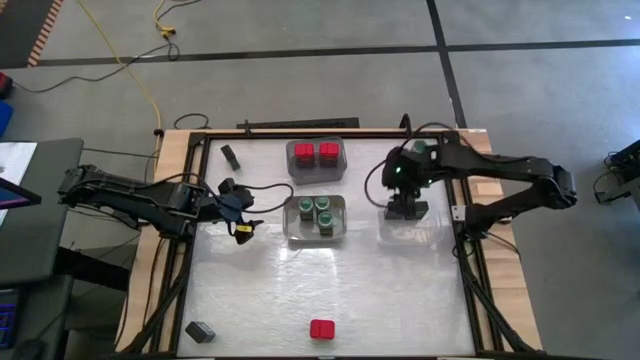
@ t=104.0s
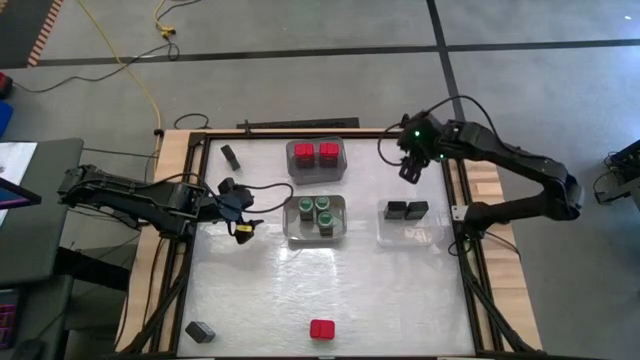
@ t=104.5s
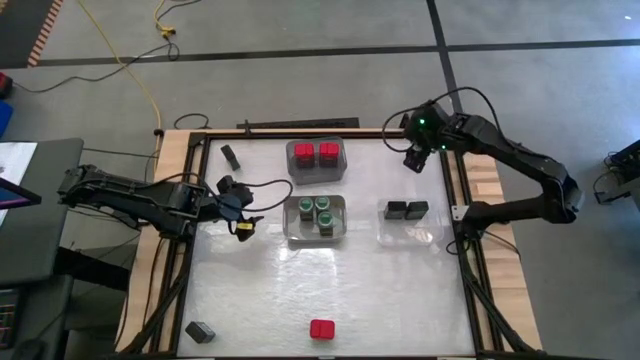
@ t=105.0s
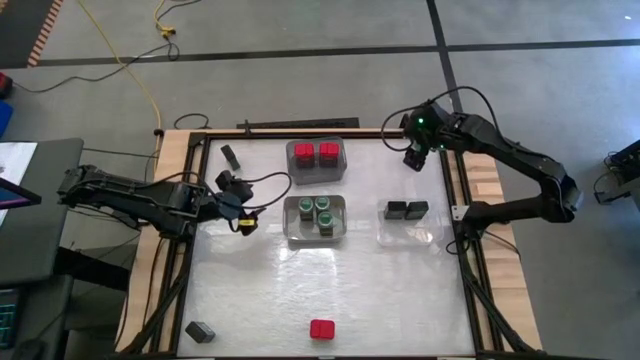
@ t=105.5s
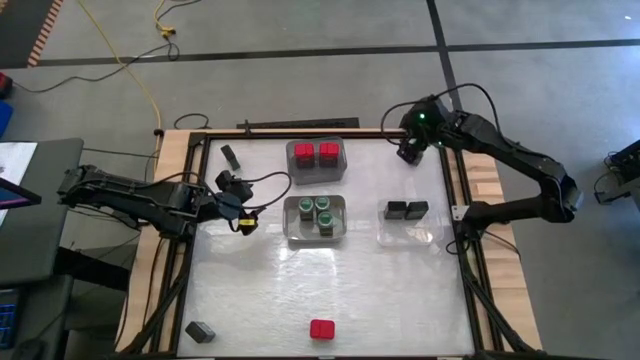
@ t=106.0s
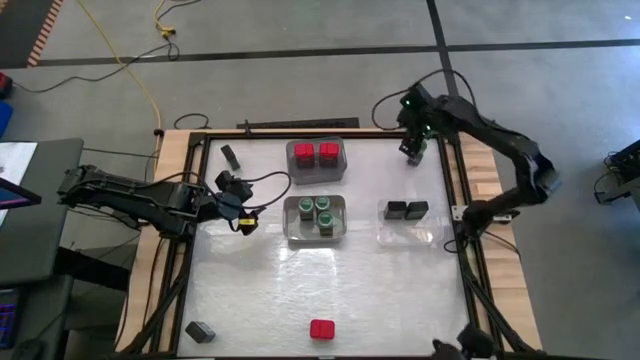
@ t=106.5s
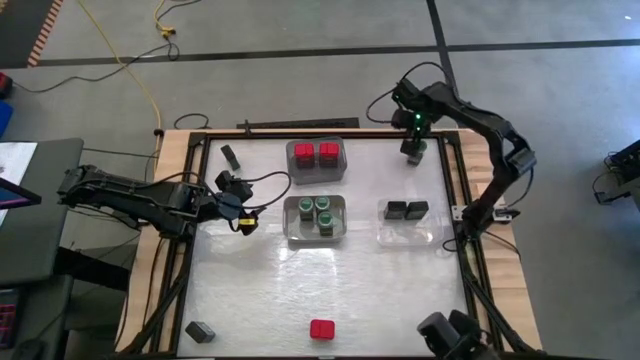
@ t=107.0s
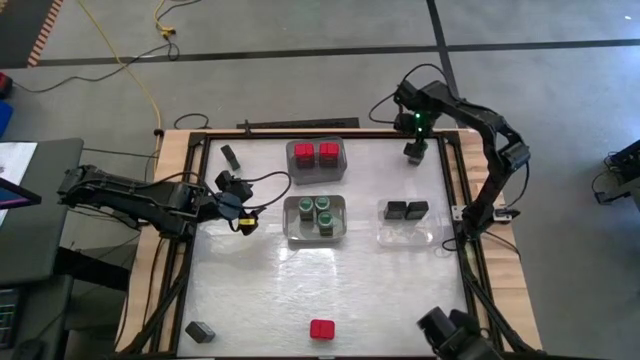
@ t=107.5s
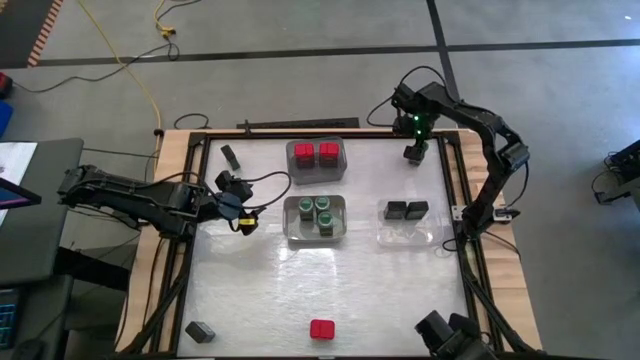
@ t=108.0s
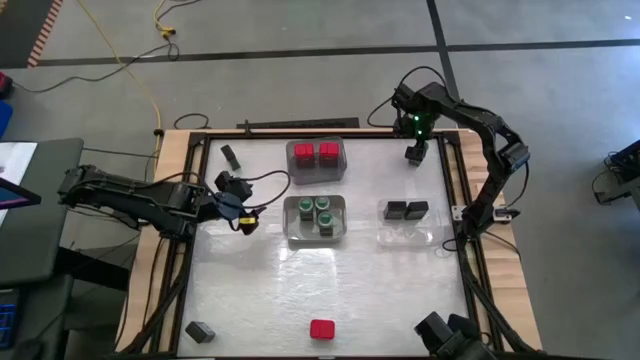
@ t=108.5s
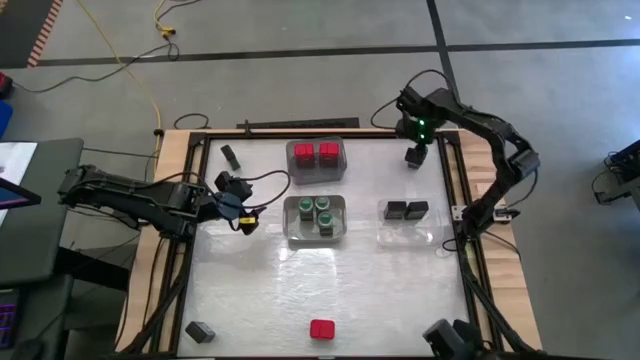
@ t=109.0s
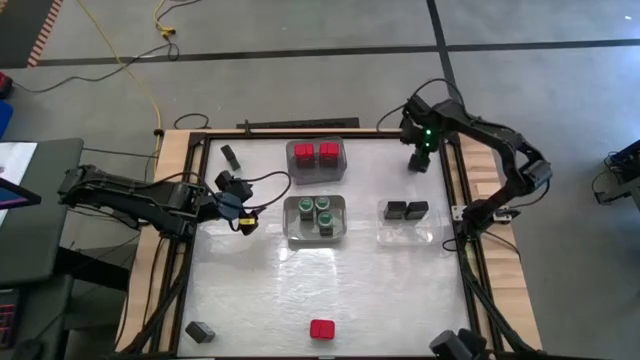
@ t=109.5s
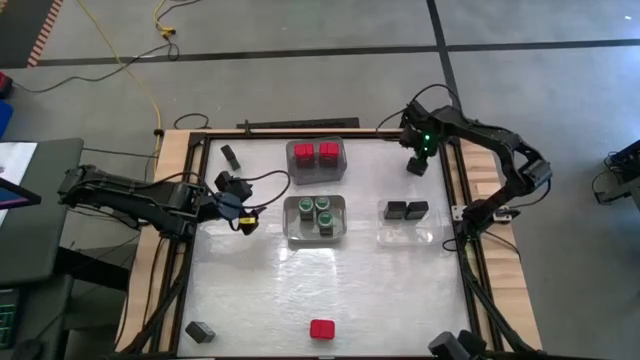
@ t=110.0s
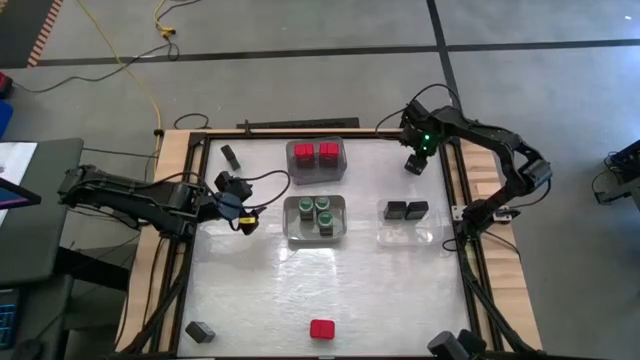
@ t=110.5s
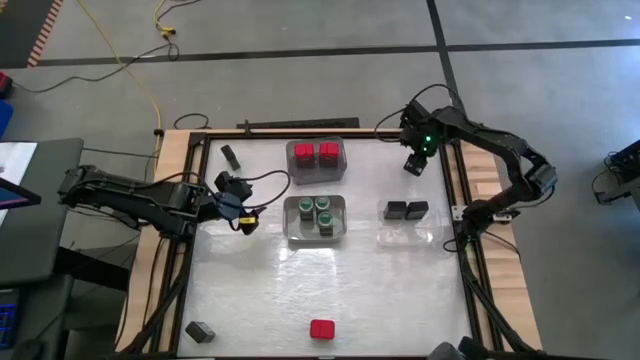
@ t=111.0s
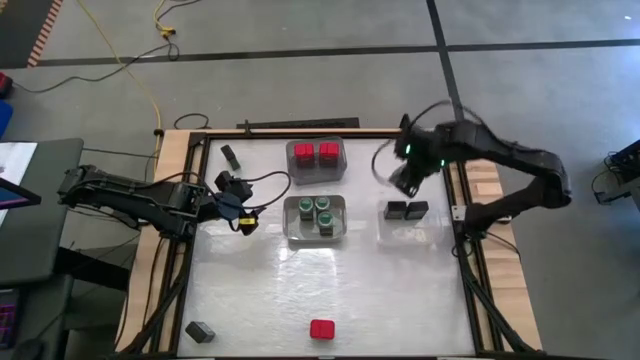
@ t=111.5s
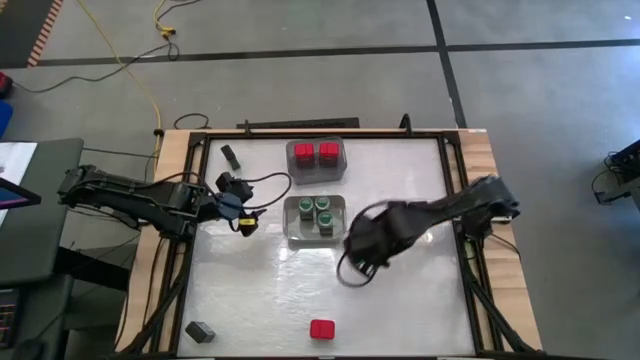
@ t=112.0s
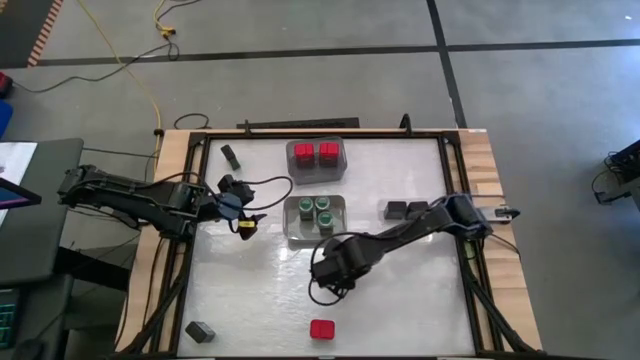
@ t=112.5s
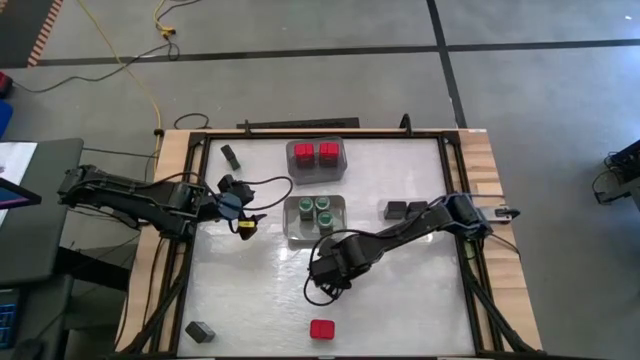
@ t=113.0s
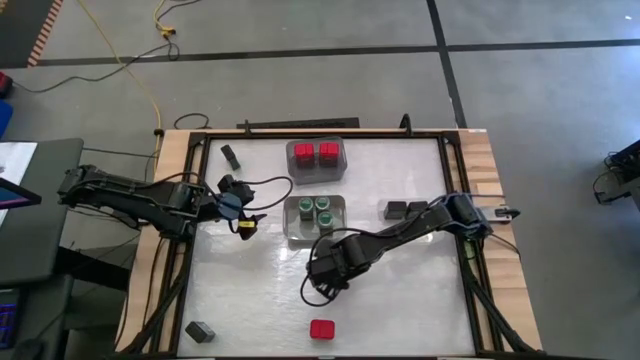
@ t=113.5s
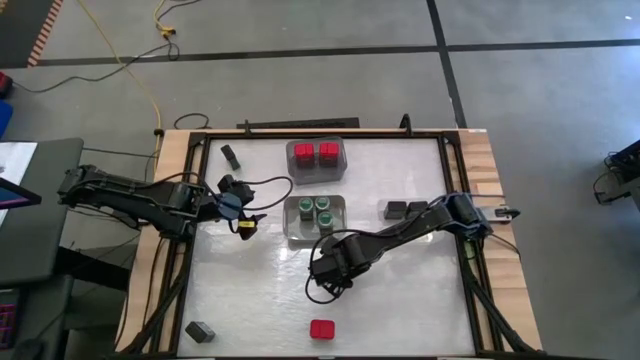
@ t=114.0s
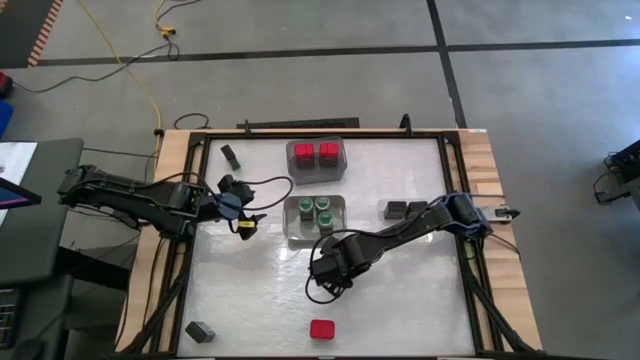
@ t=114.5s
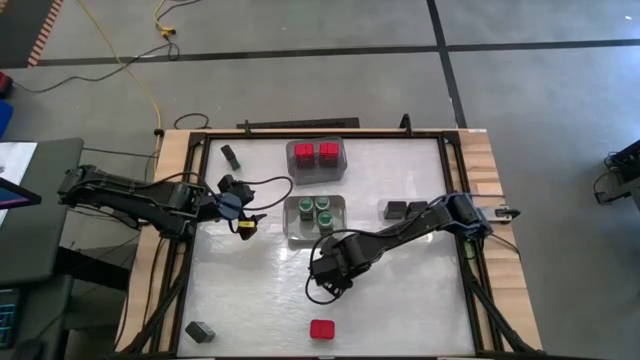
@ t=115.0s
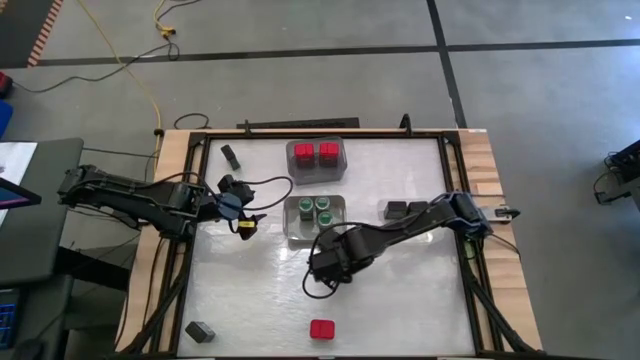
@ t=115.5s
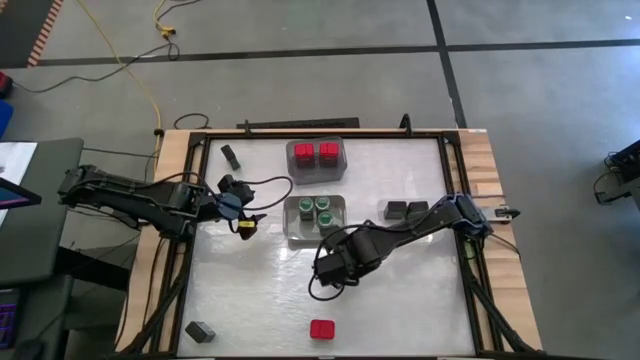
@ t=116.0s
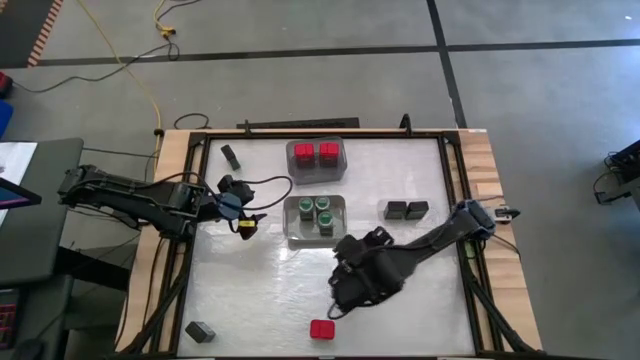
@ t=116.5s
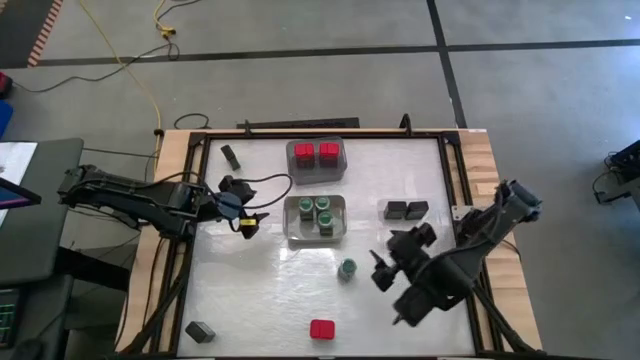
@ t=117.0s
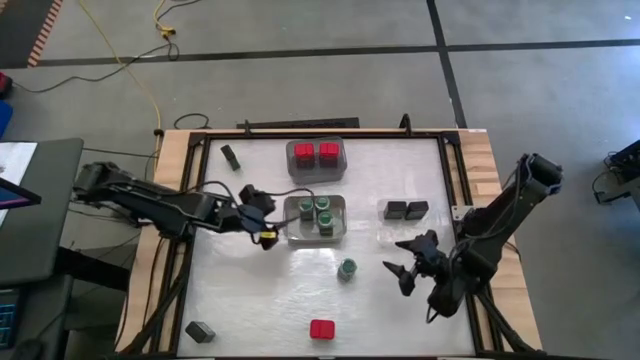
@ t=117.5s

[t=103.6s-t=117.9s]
Task: Sort spices by type
Put the green spice bottle into the gray bin

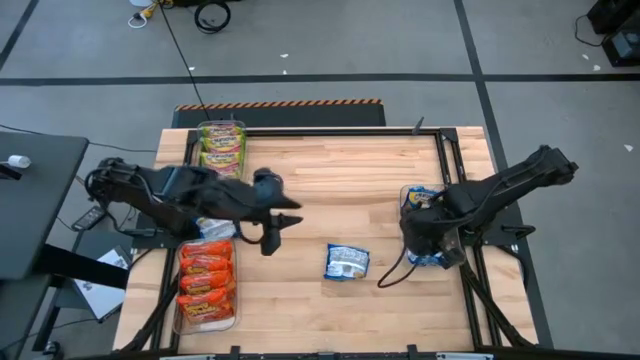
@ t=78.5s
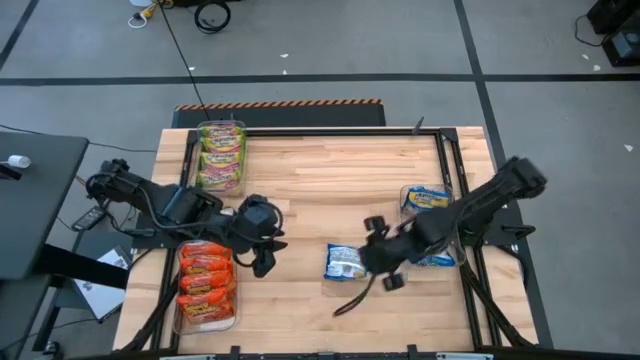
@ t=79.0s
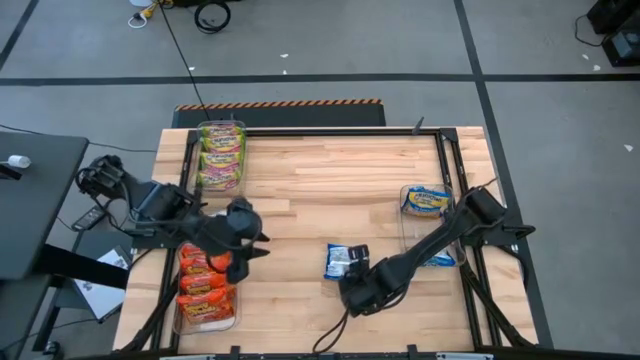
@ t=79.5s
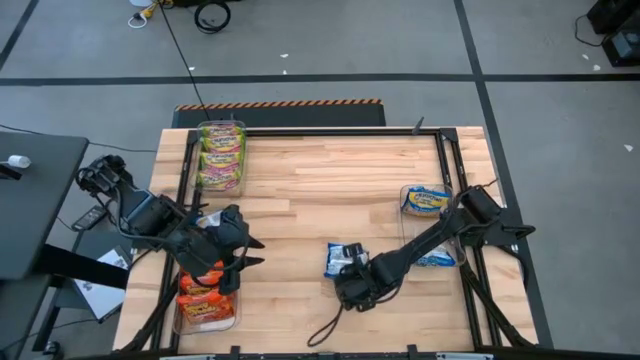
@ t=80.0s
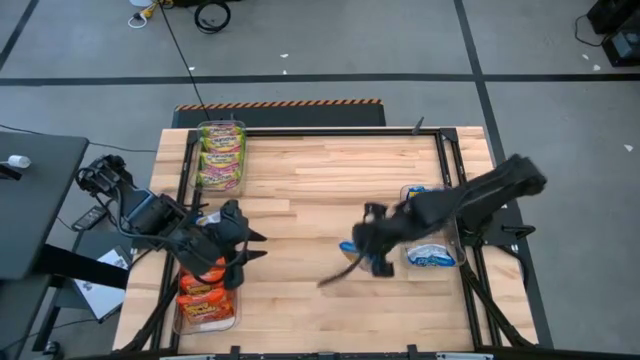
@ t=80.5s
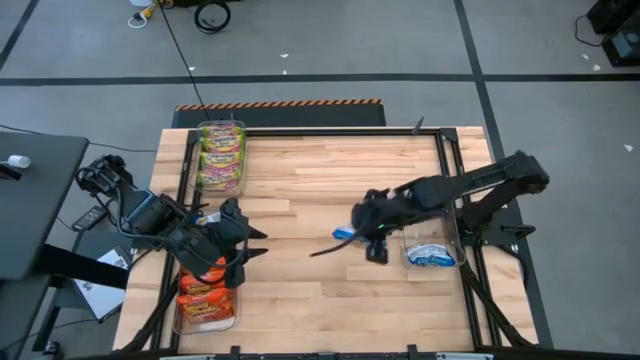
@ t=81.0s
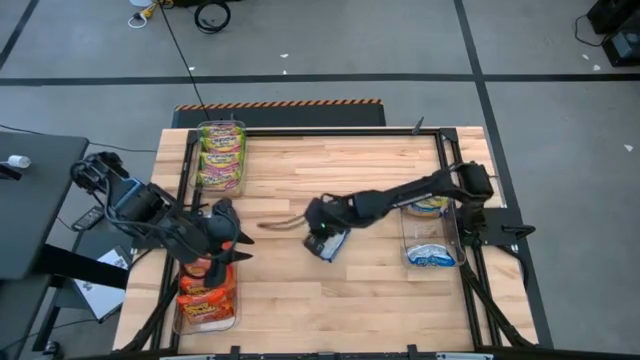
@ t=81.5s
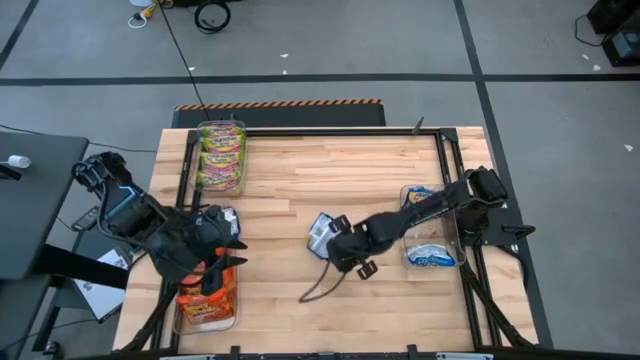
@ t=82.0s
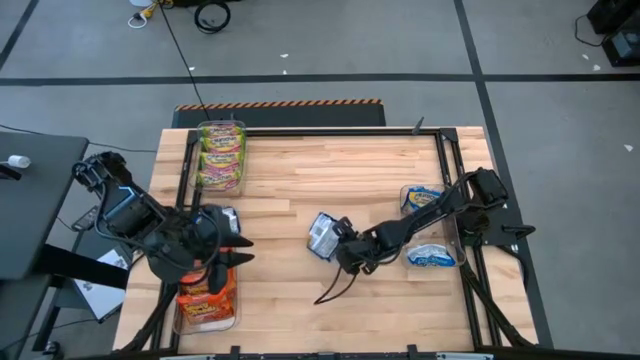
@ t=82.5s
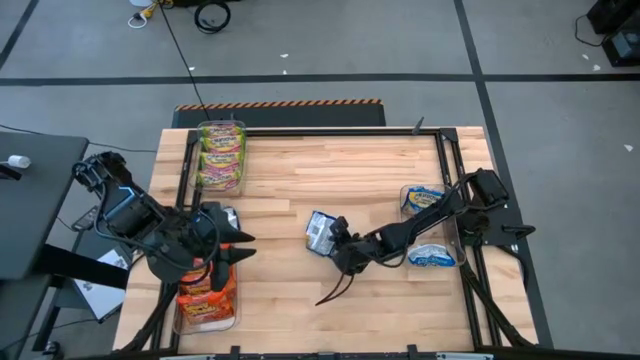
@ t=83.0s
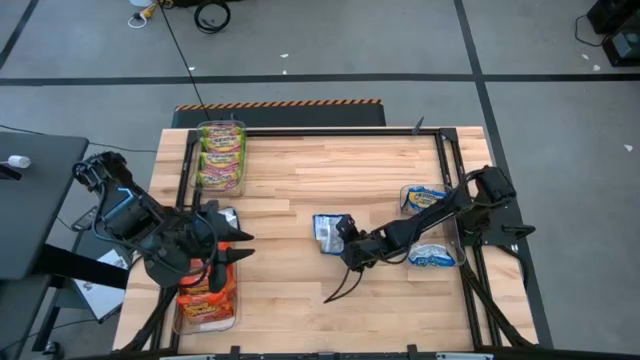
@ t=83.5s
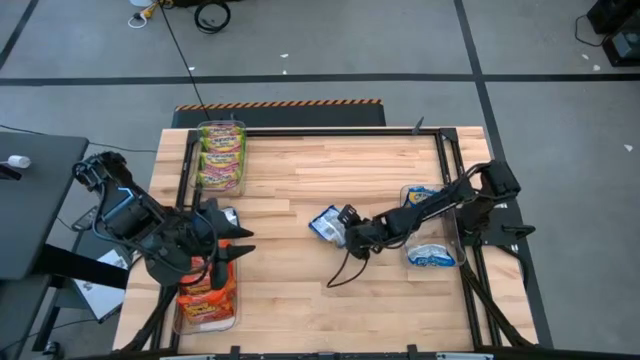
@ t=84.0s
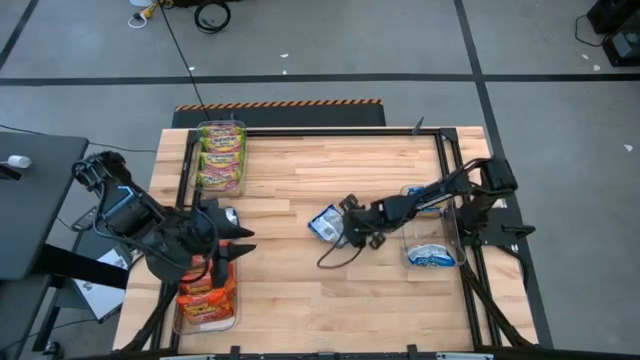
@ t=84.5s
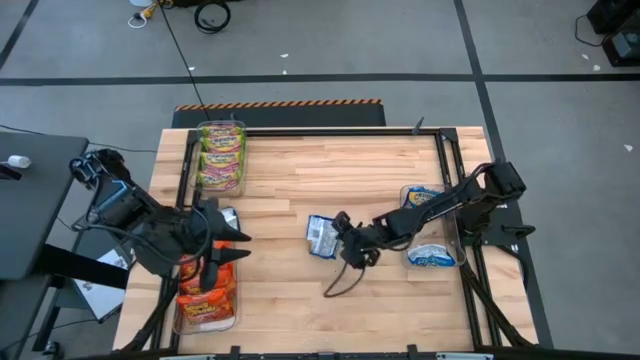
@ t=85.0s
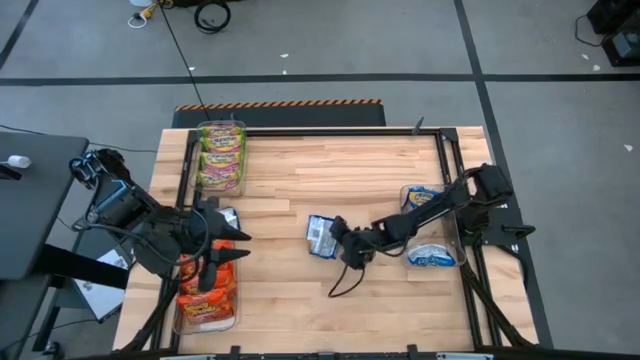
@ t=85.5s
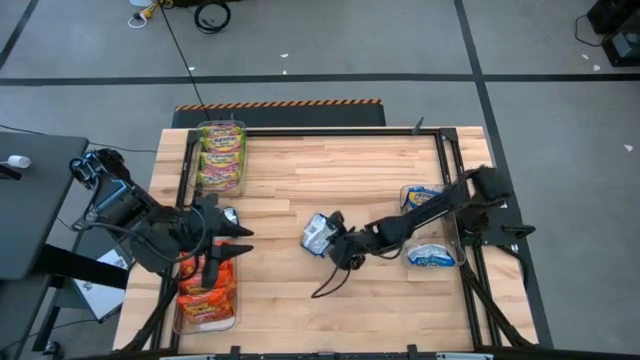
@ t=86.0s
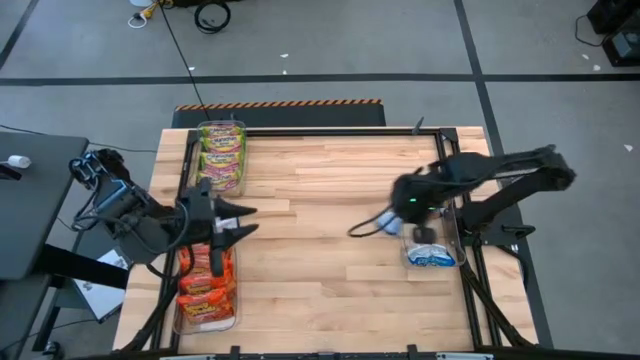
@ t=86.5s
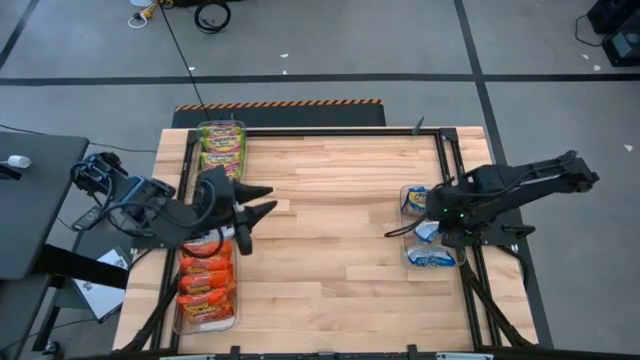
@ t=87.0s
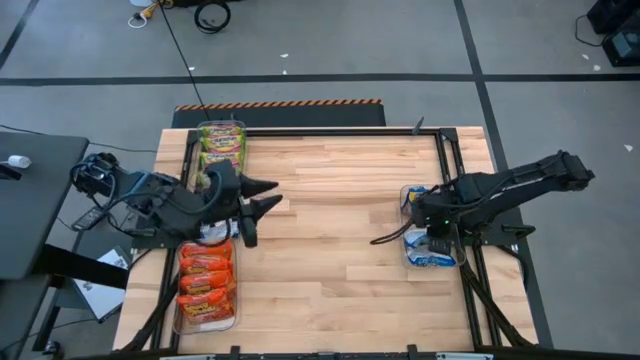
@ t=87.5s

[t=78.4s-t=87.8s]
Task: Sort Maruchan noodles
Put the right blue noodle pack into the right transparent bin
